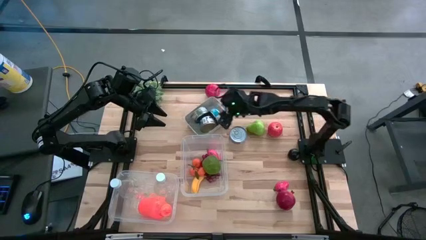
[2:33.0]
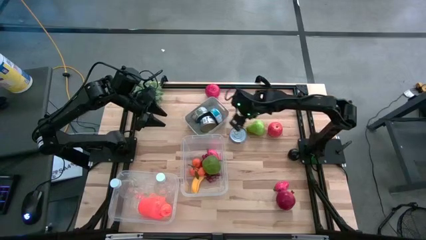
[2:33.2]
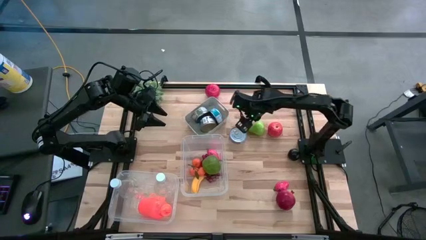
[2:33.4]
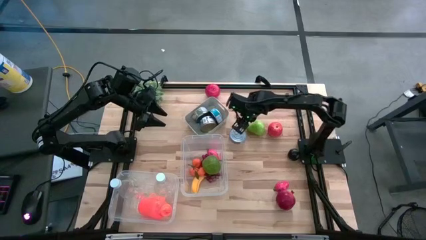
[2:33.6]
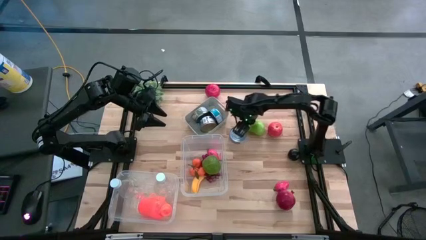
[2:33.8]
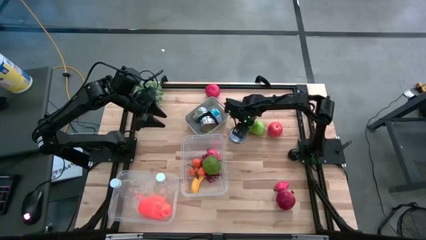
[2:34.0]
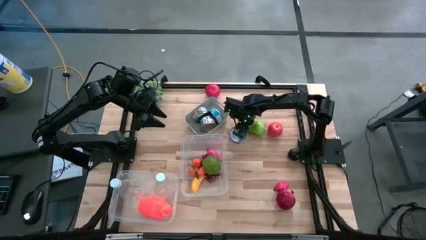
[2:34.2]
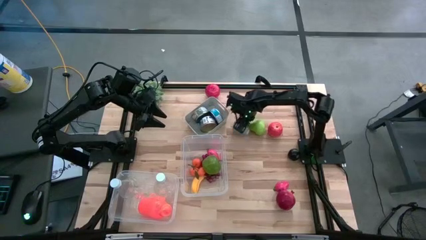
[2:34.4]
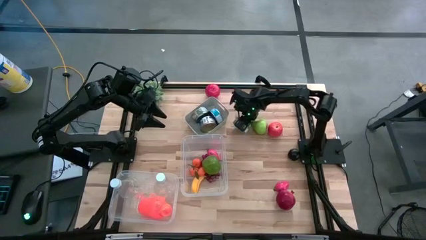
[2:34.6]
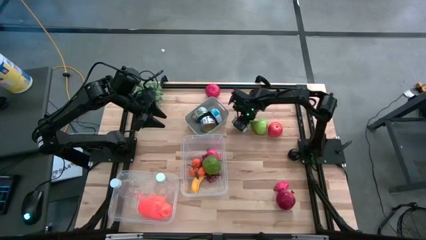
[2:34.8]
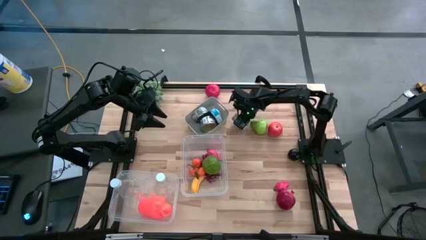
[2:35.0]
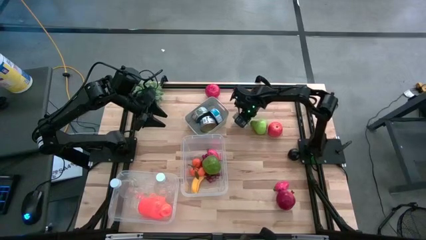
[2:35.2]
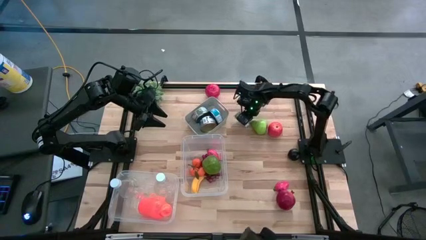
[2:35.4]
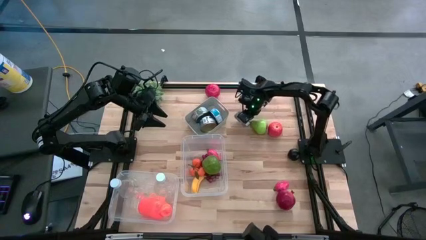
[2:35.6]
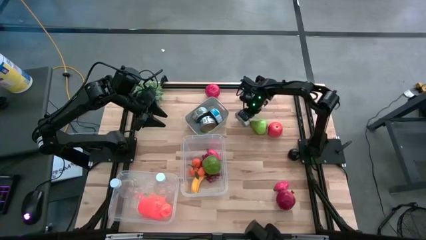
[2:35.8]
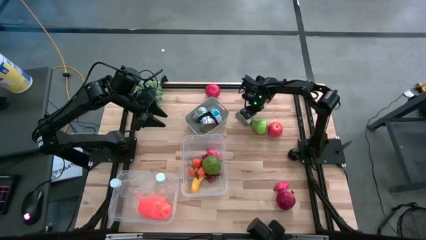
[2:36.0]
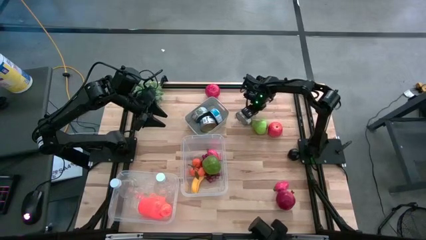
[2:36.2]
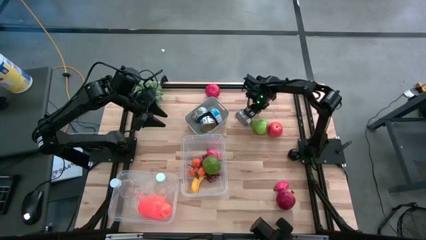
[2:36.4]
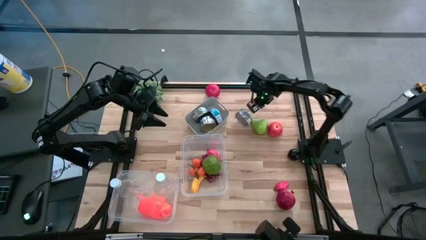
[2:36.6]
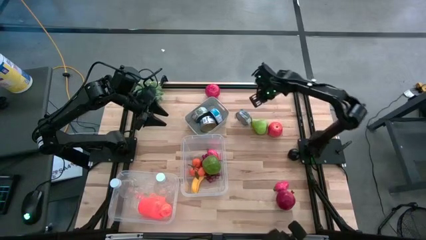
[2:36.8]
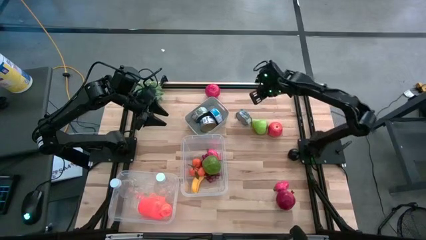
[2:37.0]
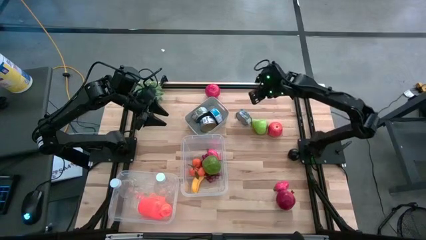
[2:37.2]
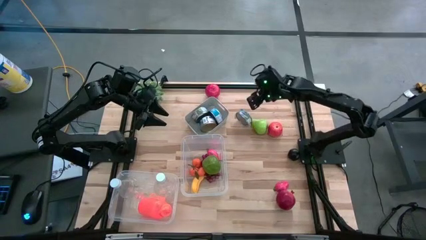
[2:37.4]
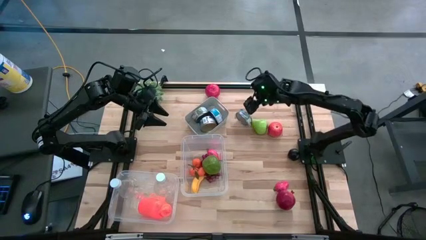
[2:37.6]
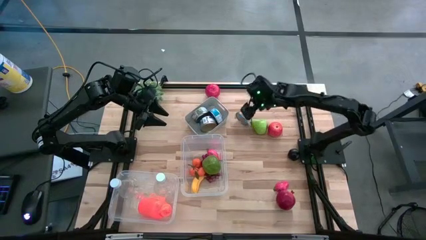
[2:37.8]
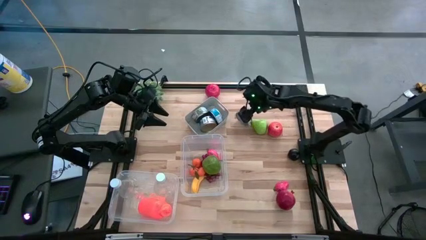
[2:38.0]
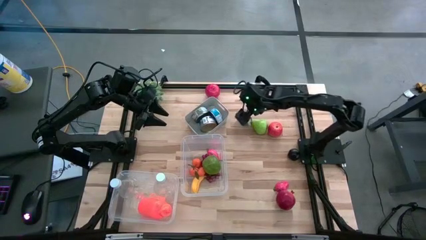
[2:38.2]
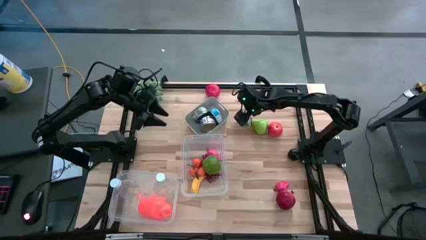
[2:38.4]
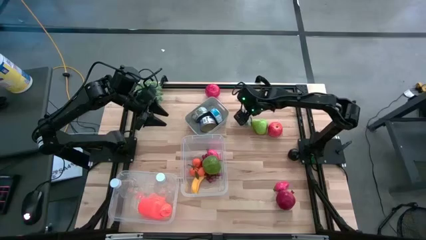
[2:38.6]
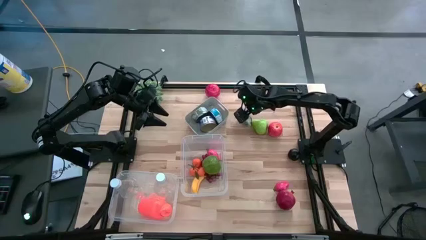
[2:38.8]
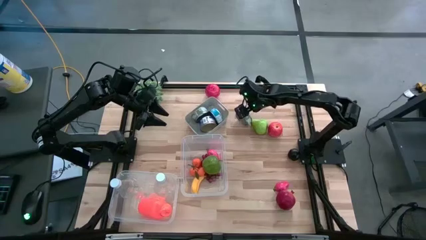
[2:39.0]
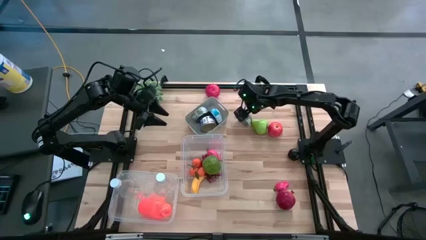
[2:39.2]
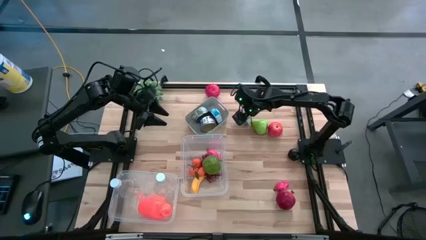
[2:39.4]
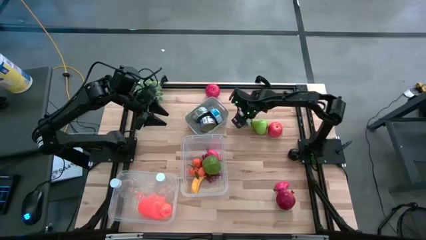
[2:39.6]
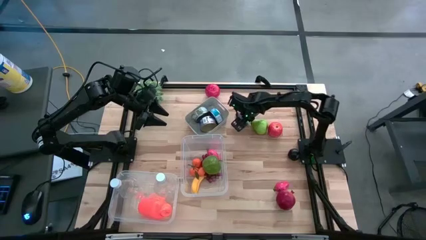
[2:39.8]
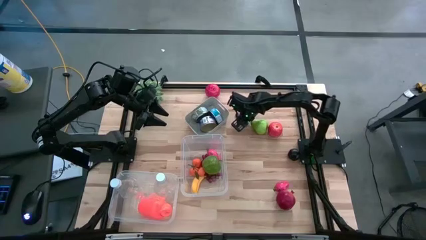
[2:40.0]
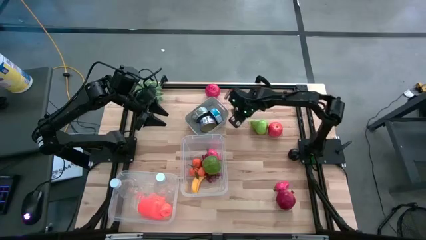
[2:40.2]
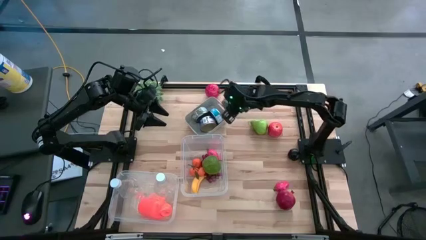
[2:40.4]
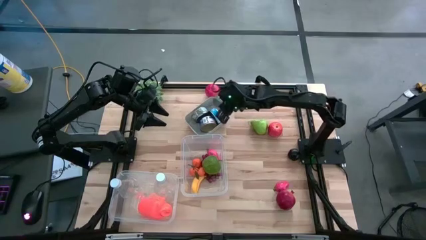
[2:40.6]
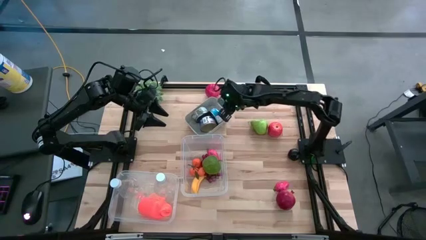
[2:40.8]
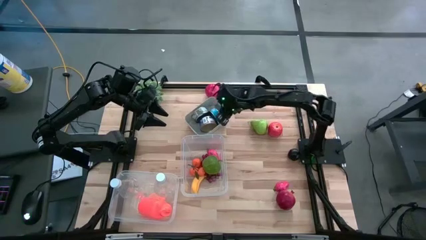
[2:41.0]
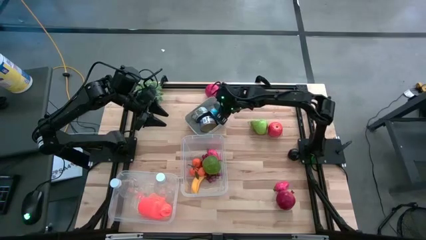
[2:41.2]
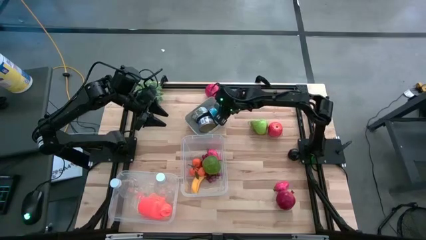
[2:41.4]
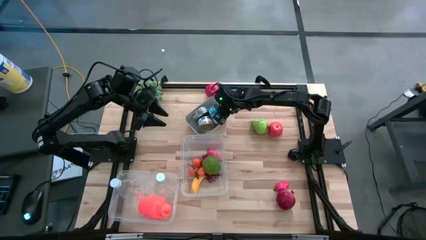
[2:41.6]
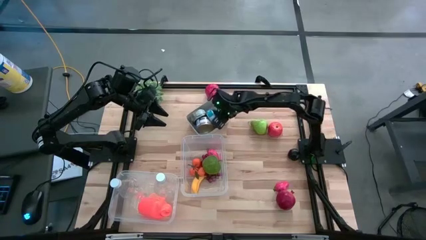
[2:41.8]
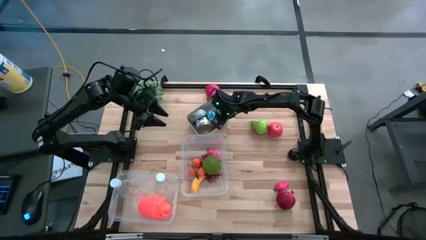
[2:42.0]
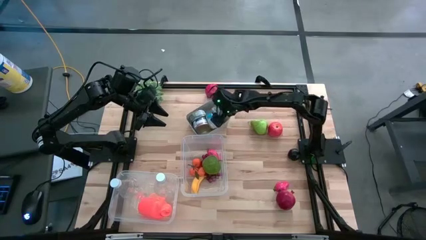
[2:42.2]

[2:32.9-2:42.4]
Task: Pick & Place Food Item
Put the tuna can into the gray bin

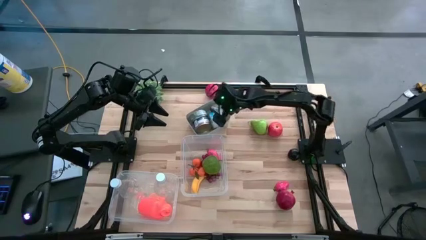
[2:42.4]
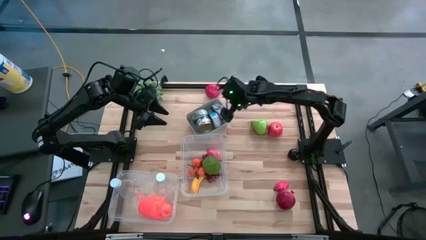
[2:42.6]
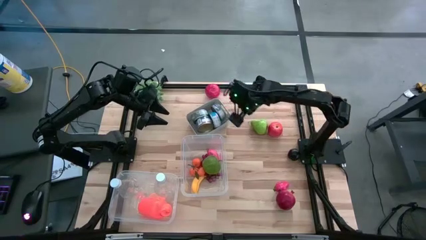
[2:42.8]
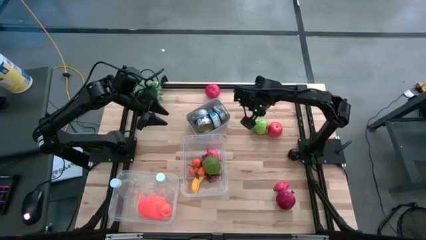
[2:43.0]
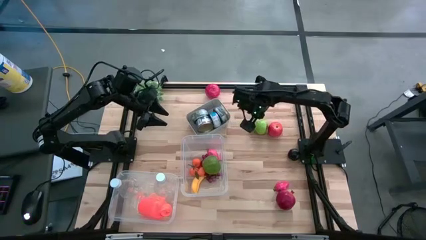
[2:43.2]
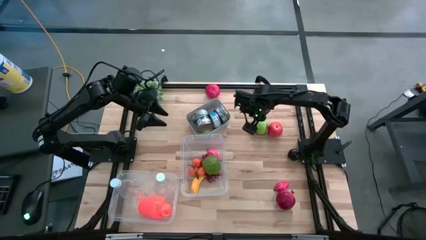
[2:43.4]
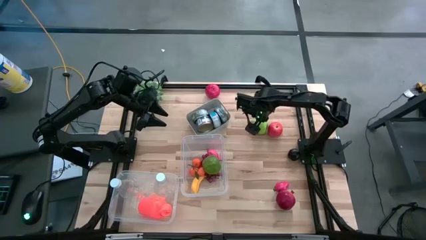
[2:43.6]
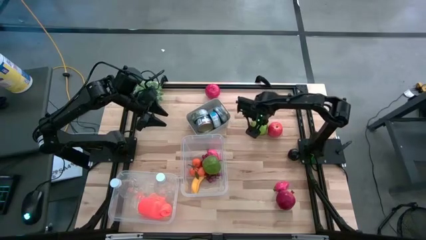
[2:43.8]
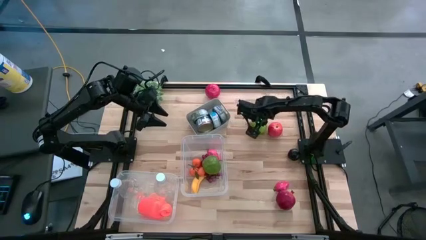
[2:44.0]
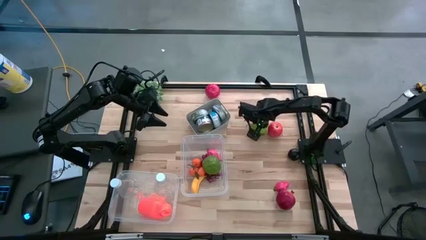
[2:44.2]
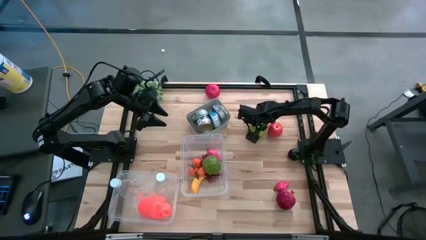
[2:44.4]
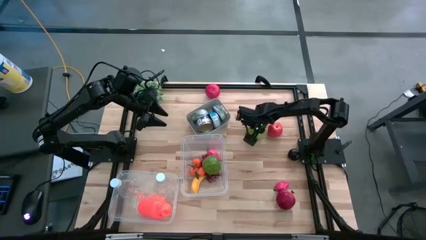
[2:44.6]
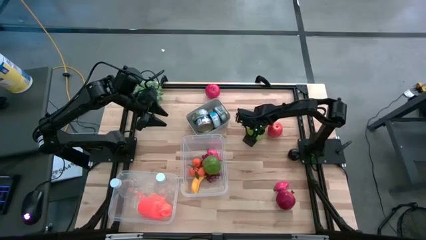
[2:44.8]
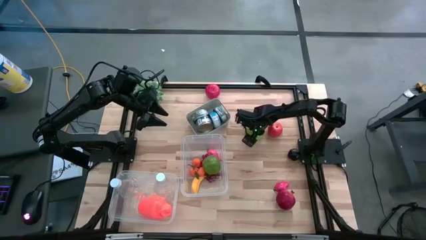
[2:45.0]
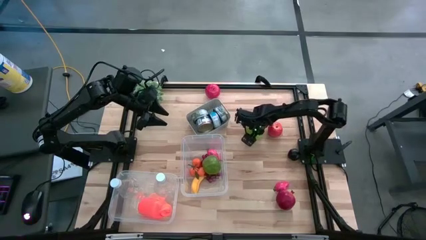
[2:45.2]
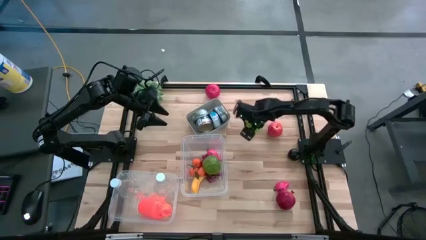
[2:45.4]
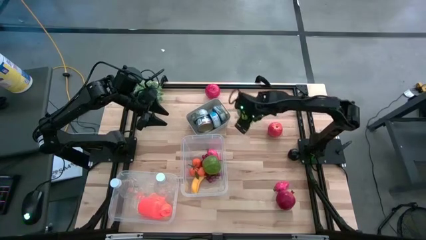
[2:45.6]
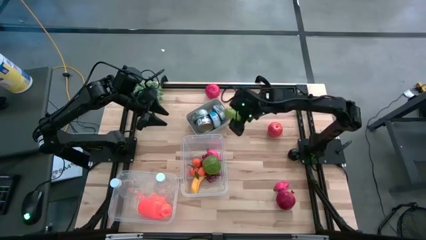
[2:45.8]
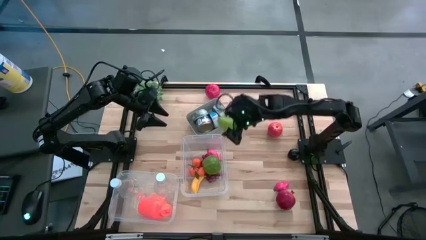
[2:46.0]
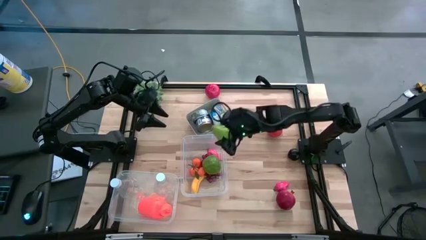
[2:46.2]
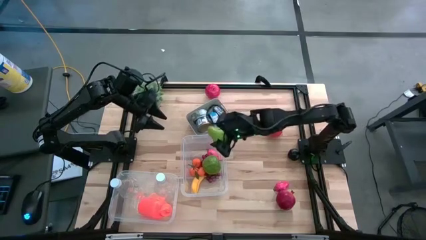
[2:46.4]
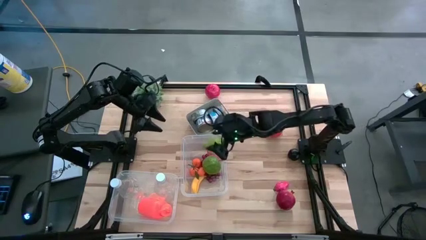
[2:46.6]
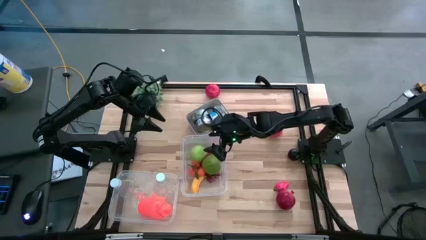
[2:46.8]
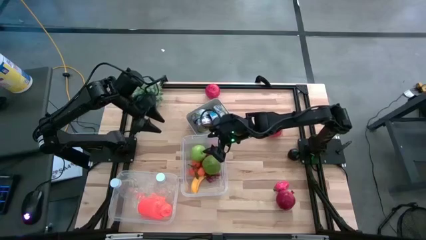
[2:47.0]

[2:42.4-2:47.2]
Put the green pear into the right transparent bin

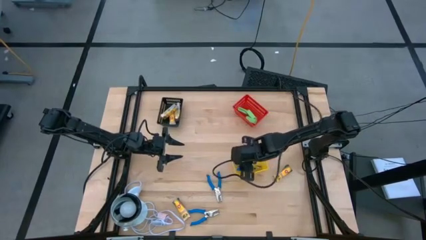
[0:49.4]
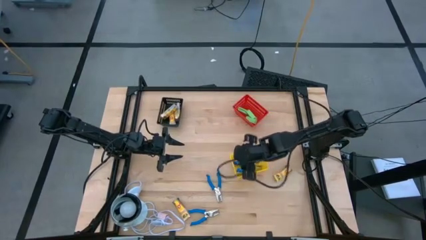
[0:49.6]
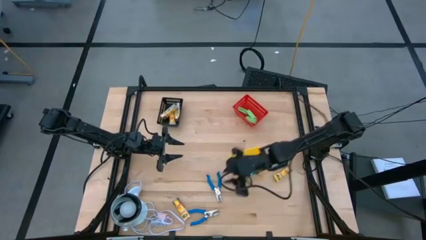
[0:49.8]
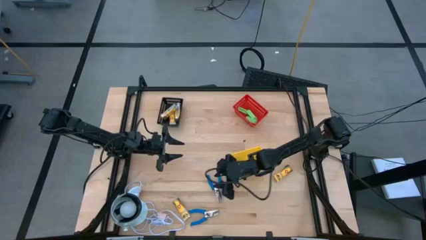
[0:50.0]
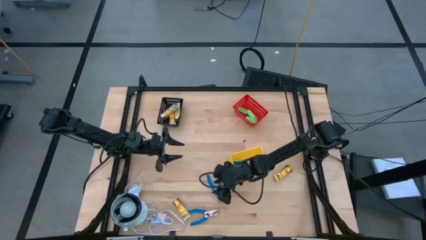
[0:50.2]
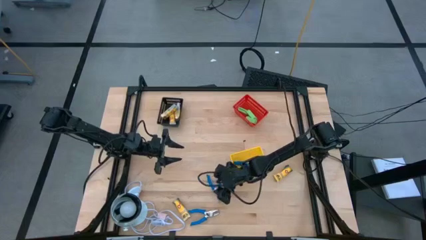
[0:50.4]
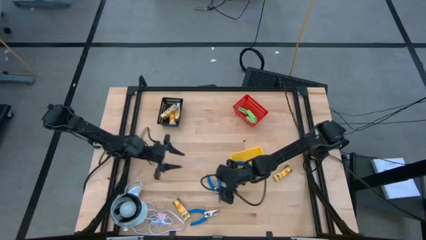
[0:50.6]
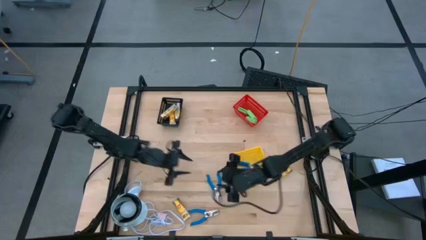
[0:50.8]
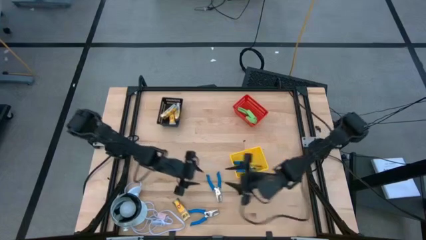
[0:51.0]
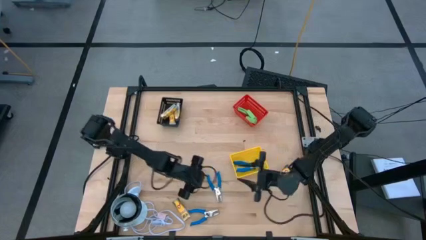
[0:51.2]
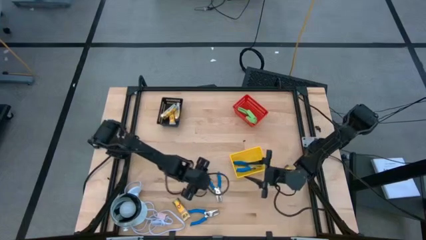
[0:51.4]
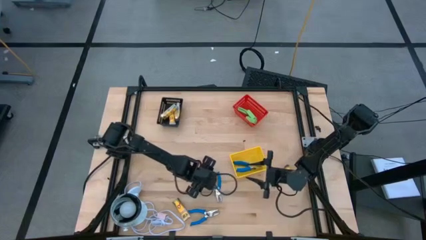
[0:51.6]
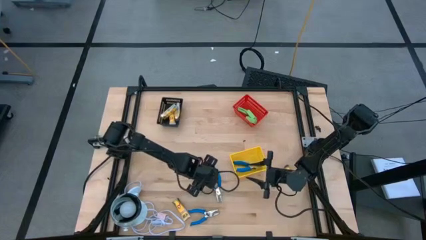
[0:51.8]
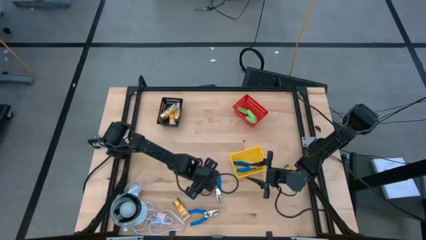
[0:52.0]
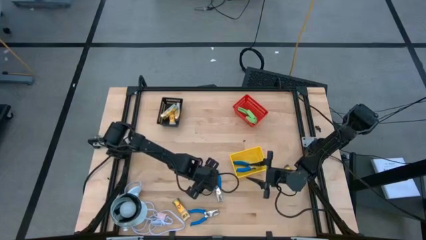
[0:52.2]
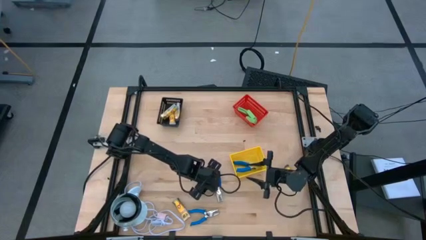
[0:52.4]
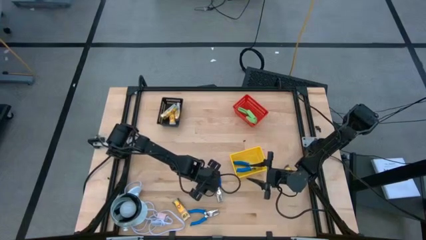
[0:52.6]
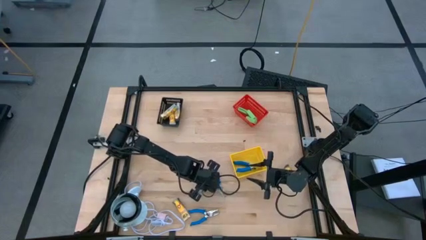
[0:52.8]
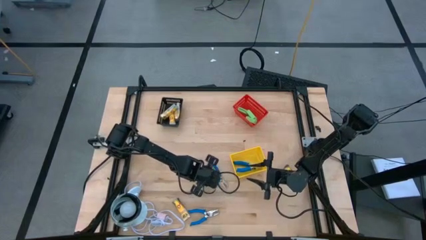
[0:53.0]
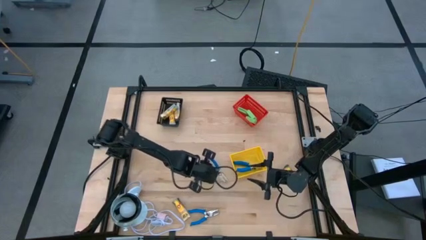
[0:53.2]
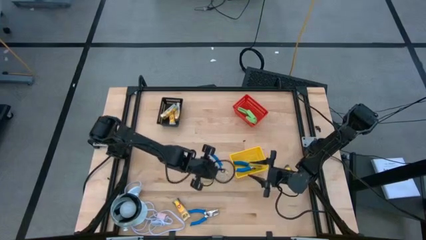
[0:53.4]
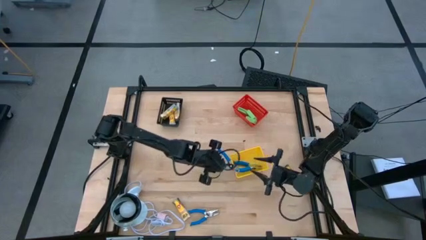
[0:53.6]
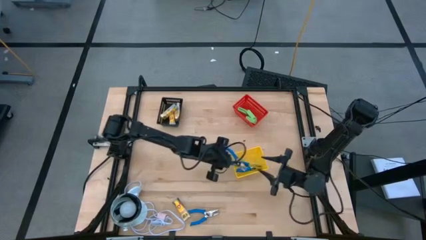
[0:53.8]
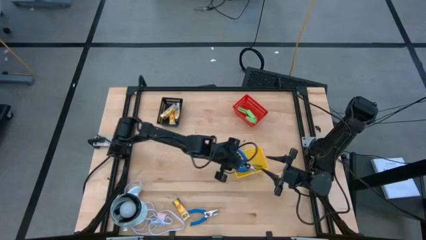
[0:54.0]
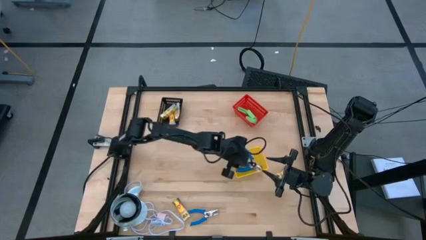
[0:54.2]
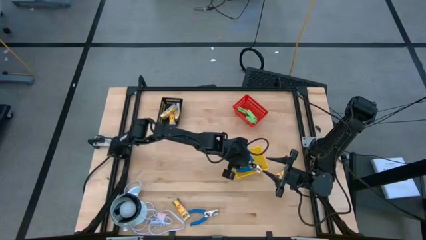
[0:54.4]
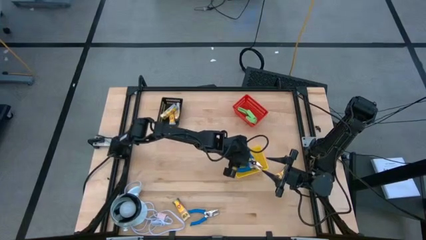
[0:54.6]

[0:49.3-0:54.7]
Task: Pick & Place School Supplies
Put the blue punch plier into the yellow bin
